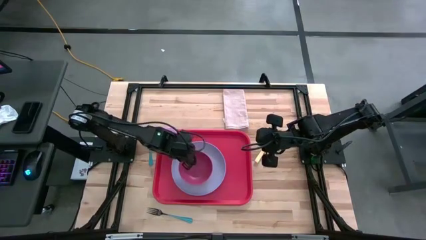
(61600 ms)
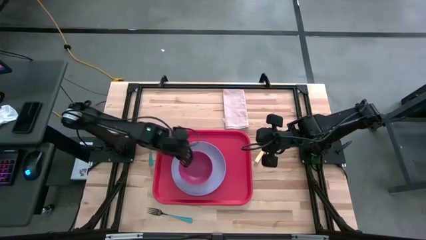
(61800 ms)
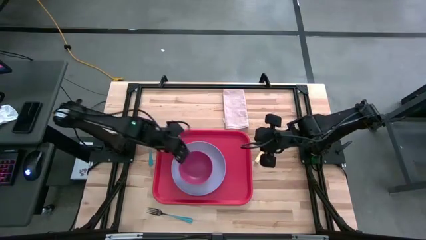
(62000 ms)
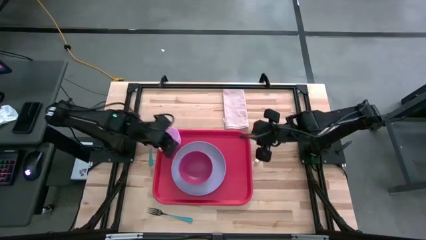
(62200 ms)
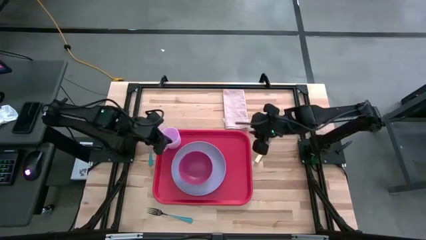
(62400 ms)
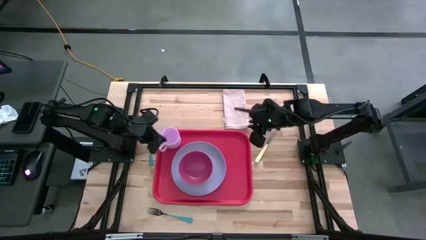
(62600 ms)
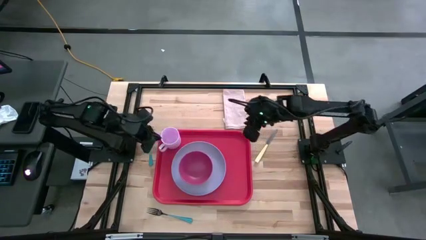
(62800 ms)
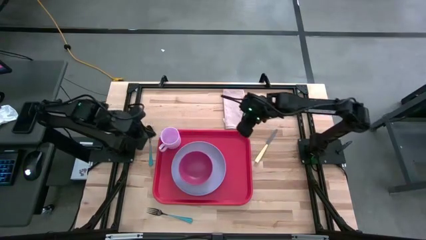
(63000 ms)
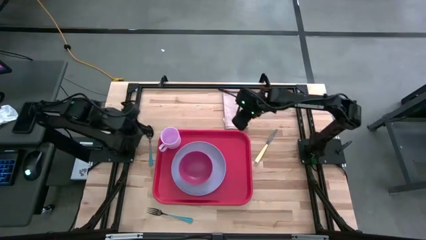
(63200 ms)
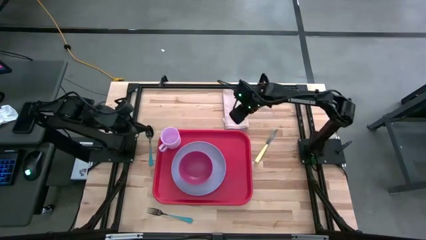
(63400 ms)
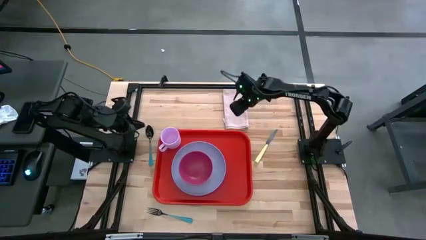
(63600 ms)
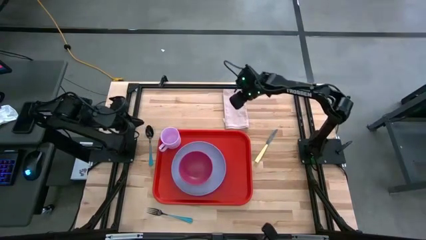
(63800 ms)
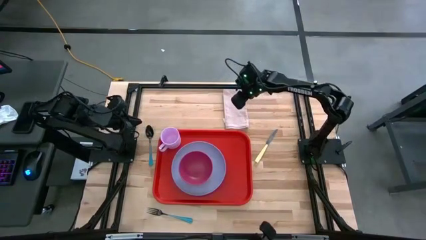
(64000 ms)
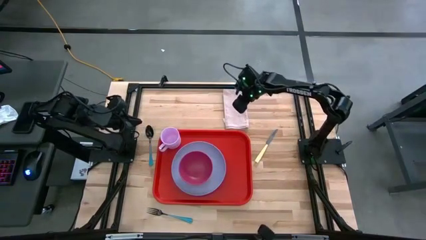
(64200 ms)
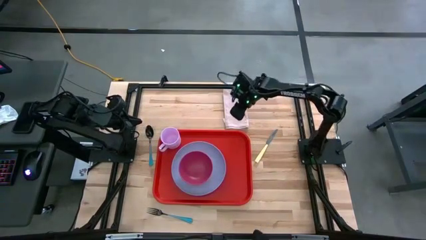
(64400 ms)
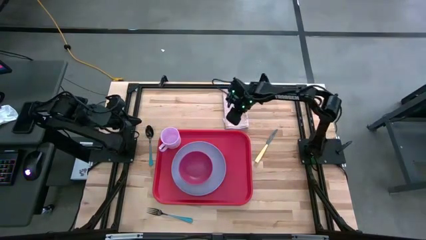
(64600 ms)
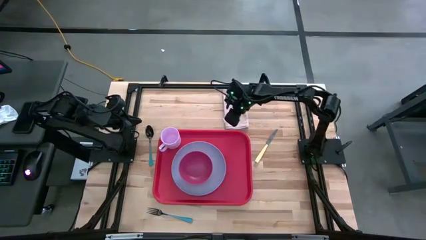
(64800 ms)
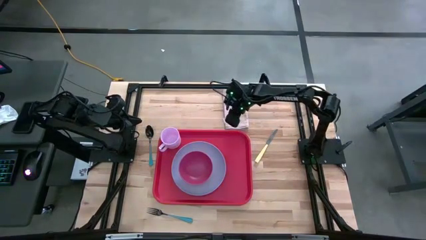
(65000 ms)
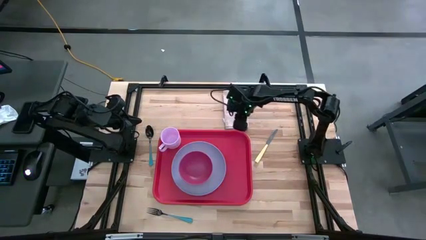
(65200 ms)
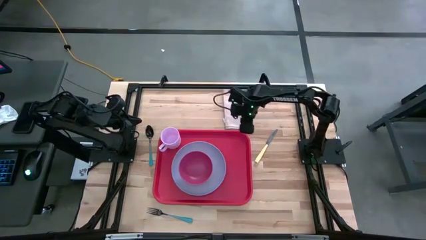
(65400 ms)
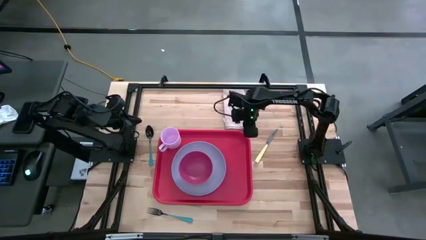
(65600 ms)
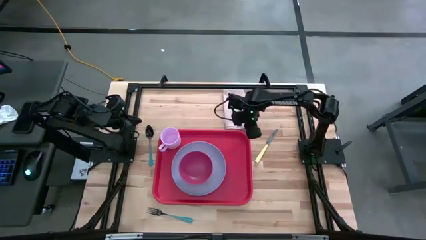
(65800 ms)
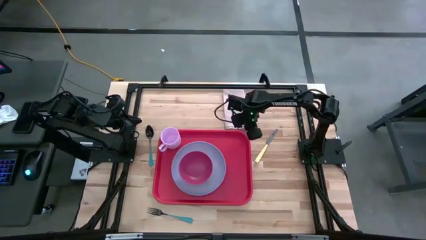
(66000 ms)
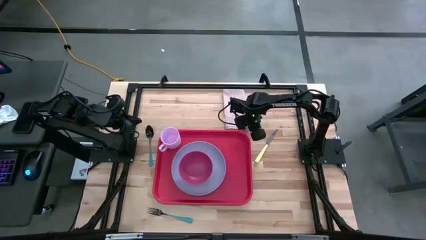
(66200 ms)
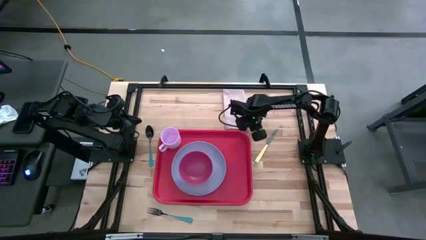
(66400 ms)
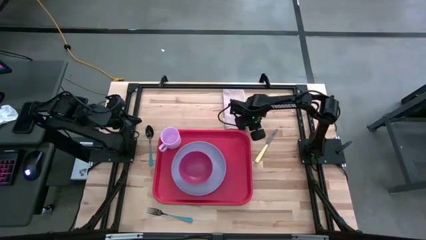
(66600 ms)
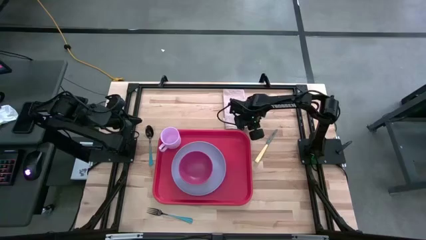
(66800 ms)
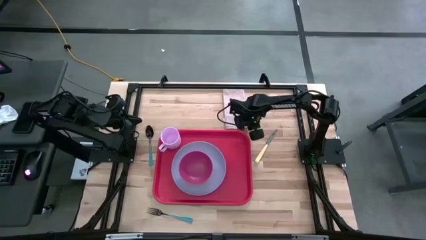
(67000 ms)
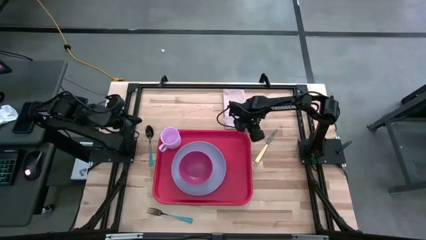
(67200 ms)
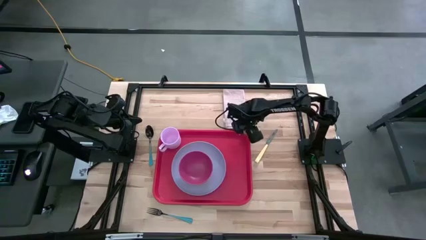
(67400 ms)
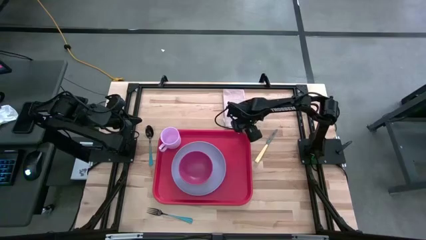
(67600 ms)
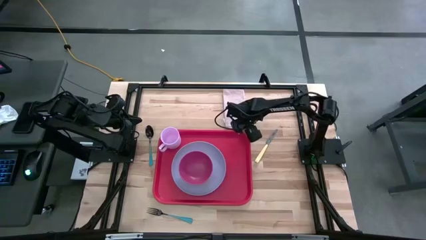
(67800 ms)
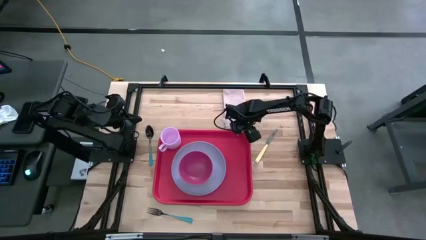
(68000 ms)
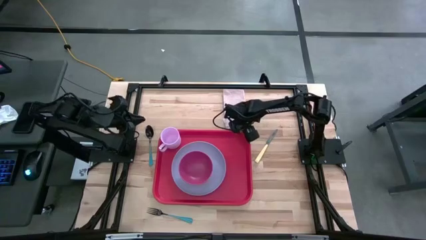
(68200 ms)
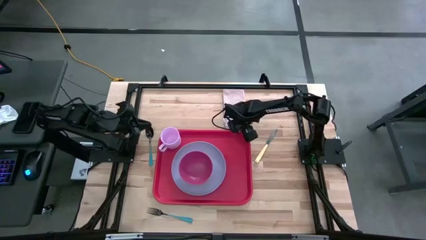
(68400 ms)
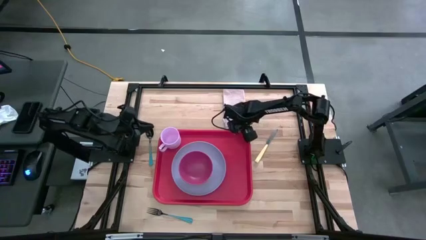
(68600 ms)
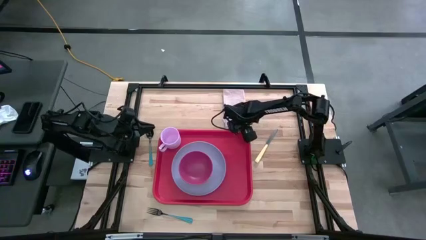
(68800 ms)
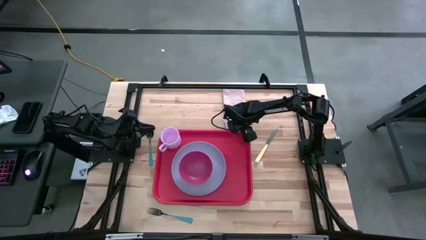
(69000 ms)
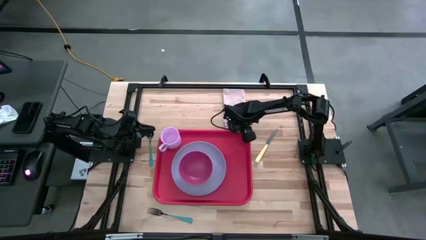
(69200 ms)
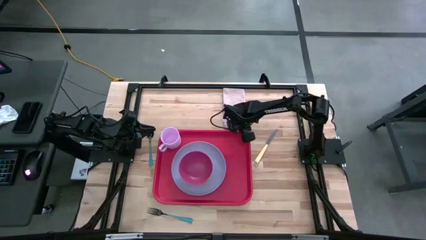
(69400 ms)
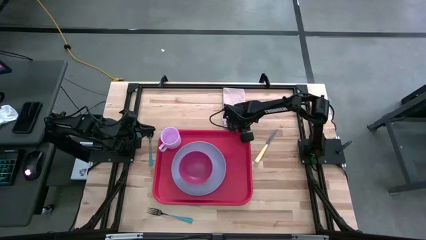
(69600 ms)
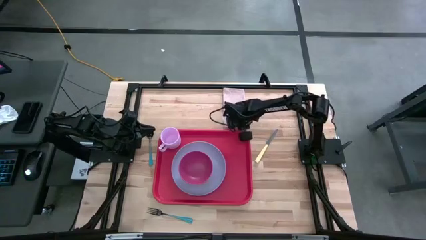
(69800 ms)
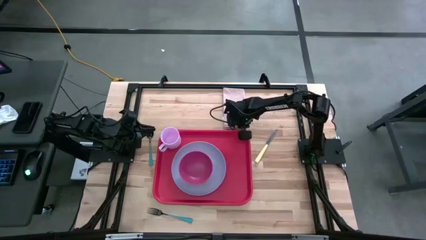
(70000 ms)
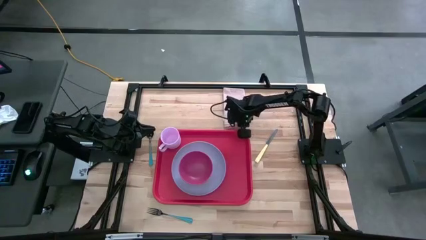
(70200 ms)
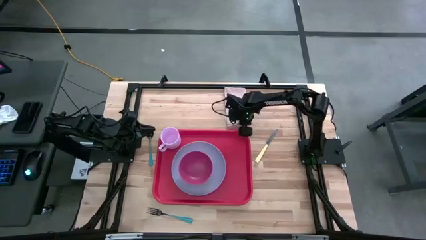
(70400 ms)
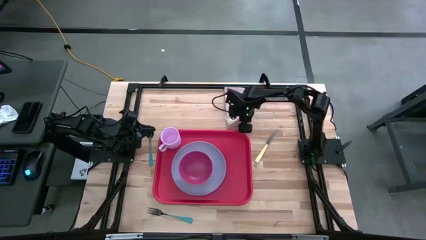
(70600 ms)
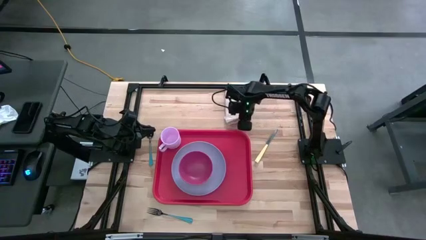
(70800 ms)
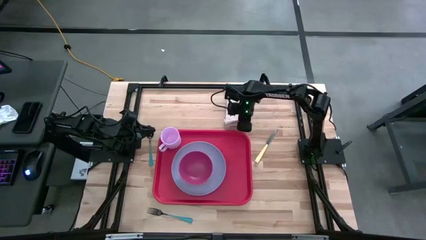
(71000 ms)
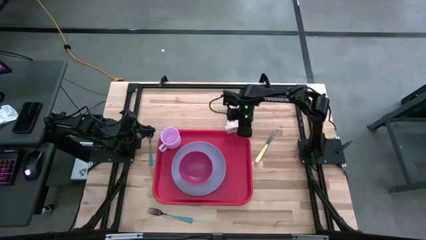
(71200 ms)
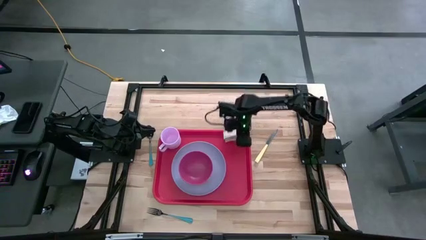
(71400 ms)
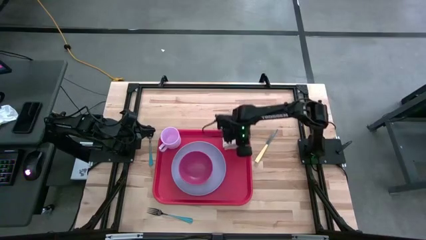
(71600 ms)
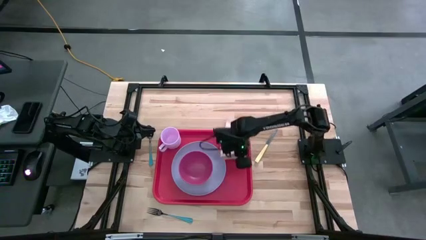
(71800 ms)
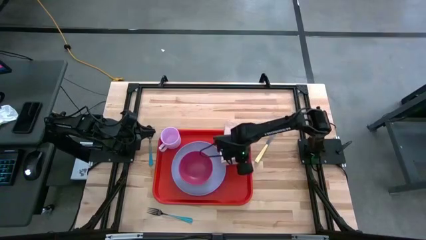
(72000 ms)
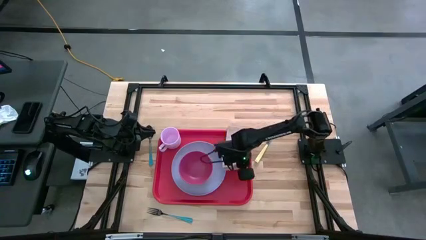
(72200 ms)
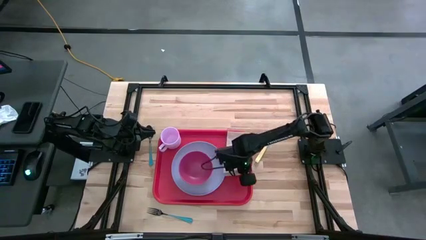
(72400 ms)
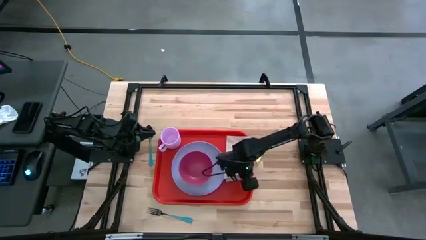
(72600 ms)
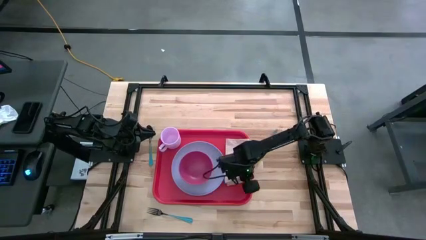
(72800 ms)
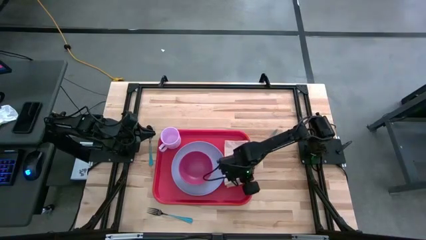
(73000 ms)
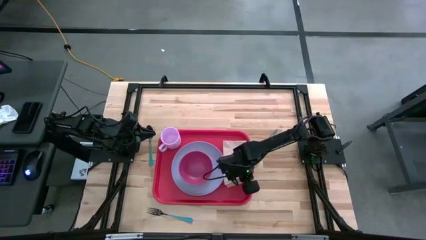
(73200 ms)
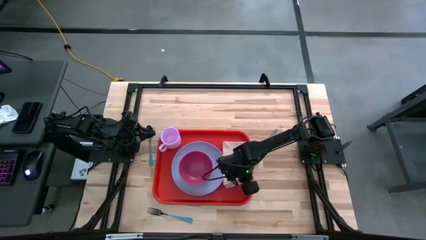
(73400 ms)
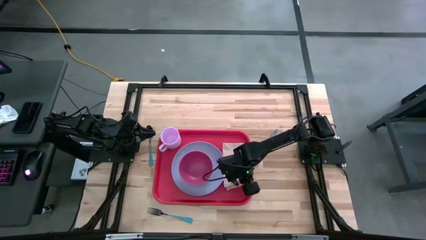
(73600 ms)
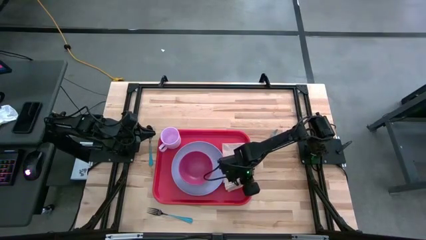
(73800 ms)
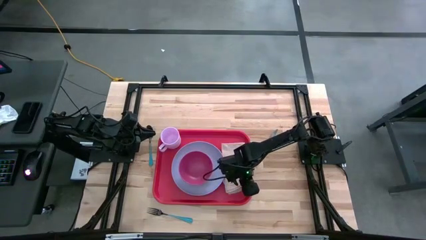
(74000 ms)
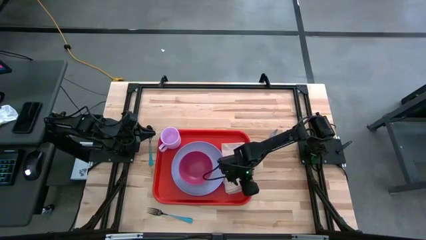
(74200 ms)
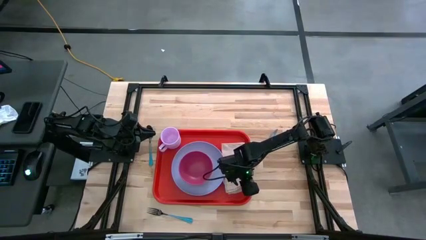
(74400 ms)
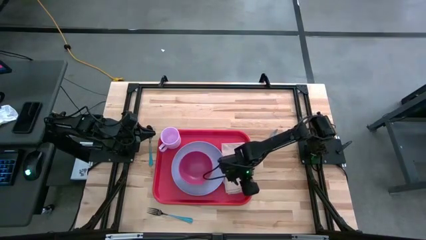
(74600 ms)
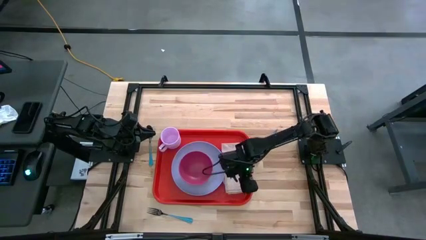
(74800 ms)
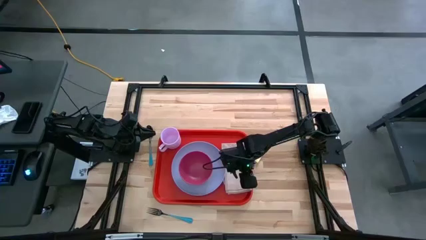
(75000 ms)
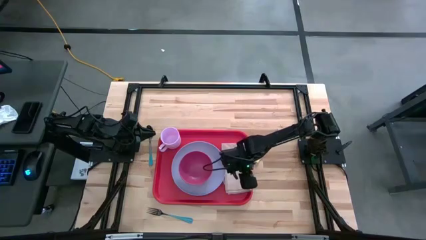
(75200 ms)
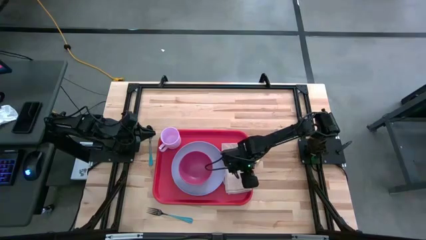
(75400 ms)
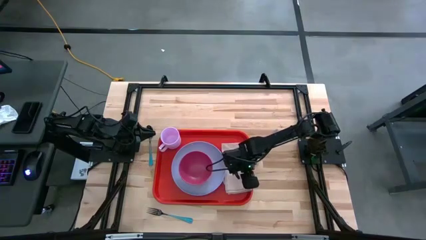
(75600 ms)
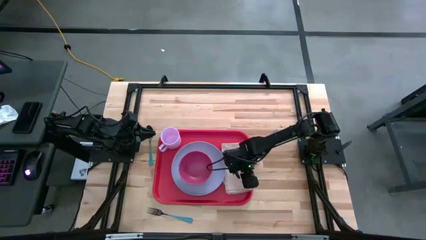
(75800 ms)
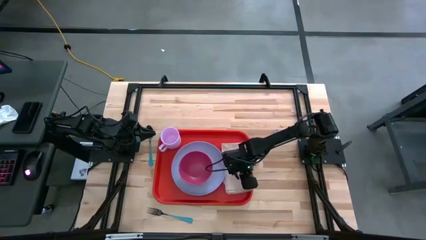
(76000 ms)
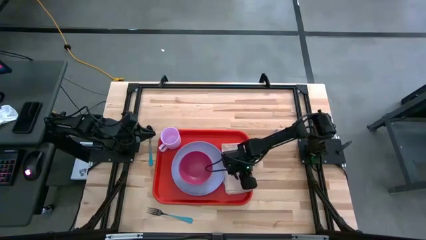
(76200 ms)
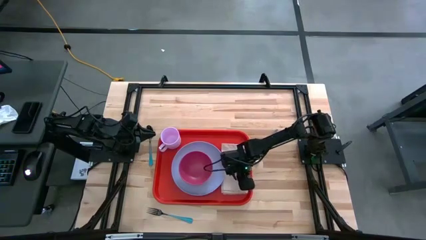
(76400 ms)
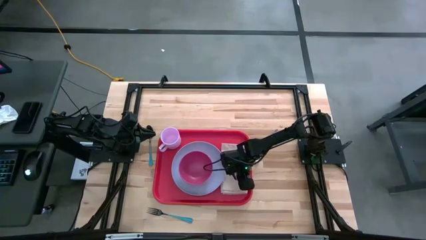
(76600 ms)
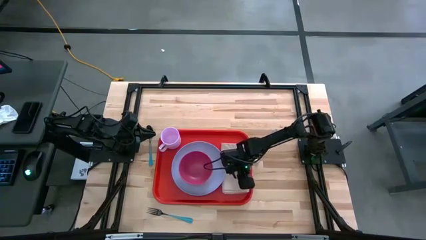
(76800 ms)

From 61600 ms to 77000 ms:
Task: Set up tray
Put the gray napkin on the red serving tray to the right of the blue plate

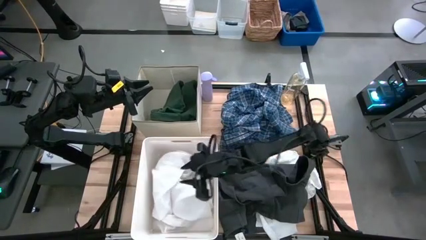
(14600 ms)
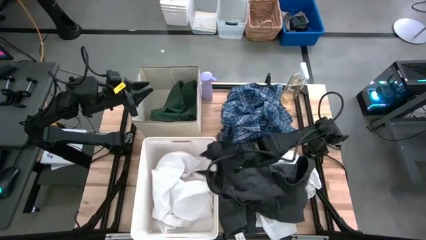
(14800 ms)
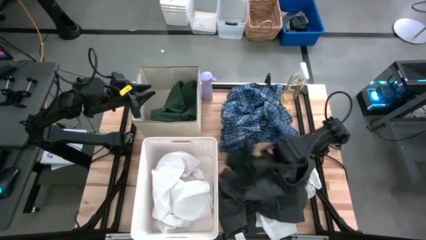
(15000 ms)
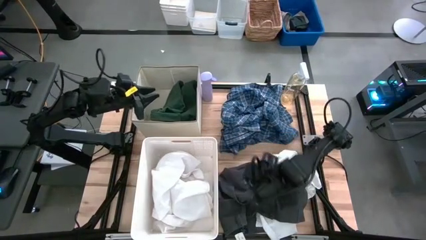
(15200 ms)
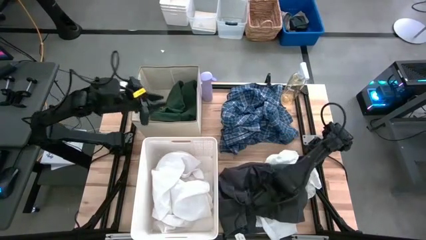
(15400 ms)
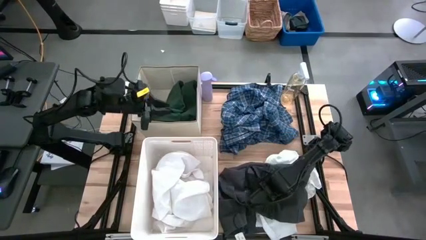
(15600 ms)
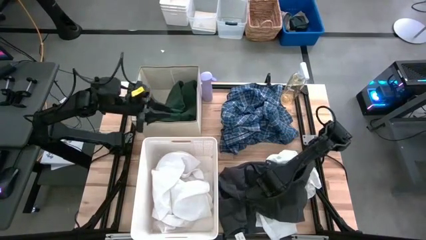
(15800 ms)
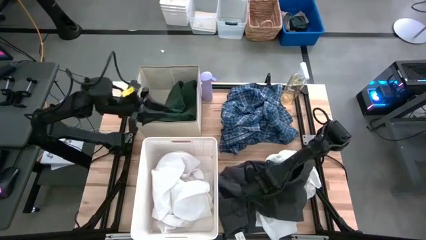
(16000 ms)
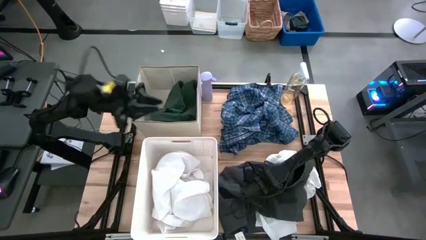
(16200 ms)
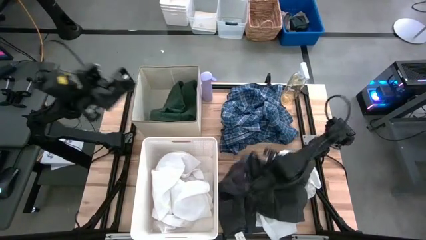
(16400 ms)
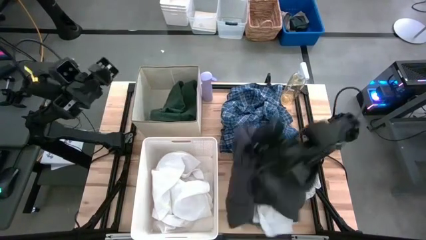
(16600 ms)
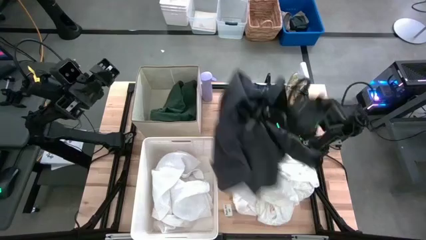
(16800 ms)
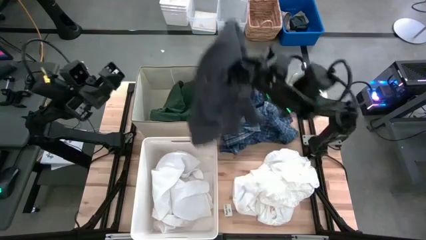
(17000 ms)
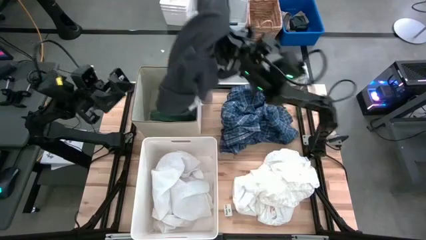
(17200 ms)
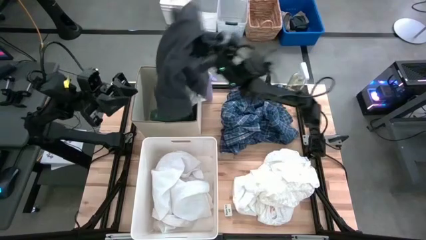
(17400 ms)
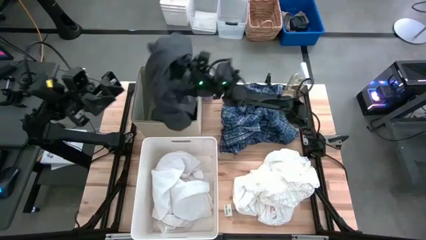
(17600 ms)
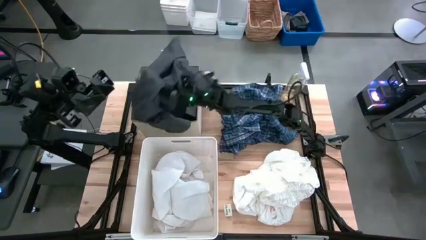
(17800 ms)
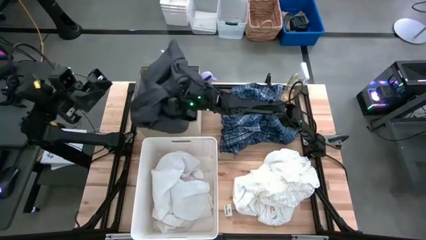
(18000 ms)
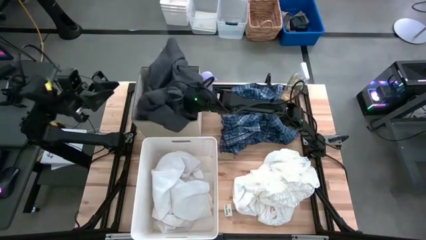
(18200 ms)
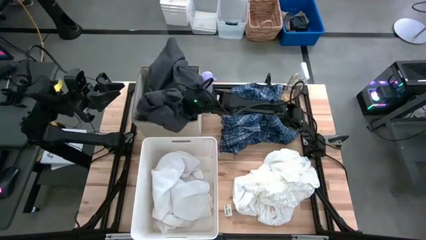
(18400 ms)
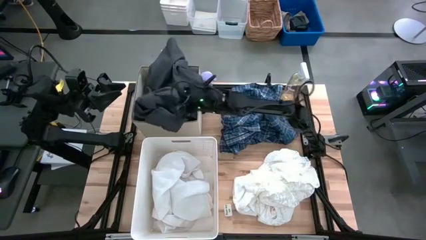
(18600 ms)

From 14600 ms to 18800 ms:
Task: Sort clothes
Put the black pants into the top white laundry organizer
